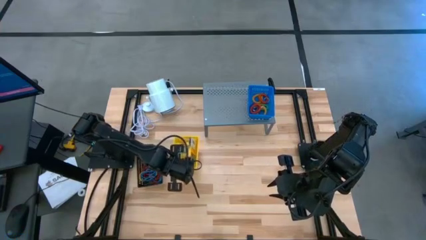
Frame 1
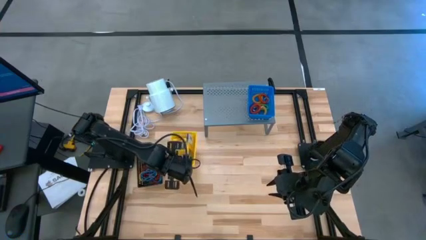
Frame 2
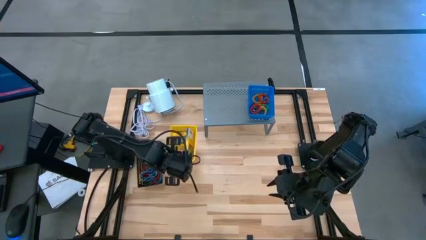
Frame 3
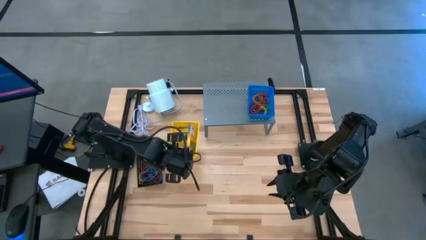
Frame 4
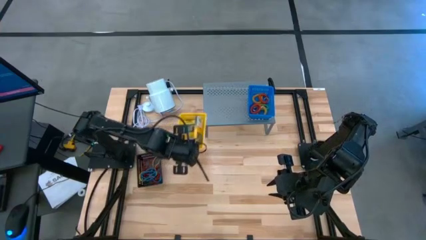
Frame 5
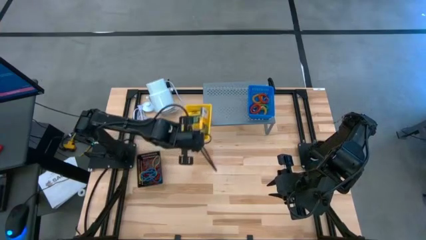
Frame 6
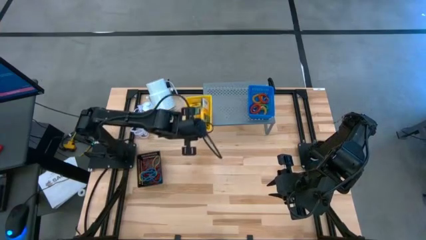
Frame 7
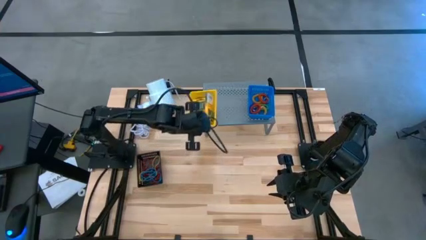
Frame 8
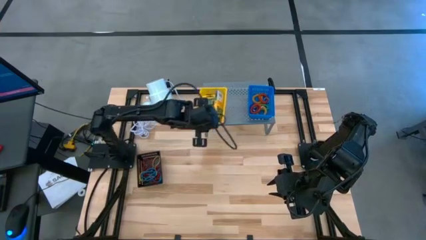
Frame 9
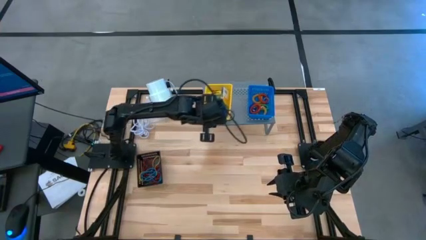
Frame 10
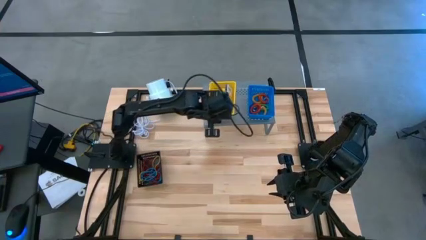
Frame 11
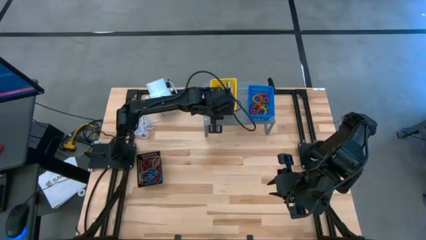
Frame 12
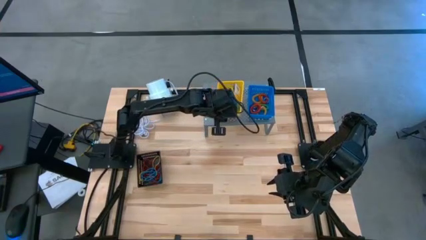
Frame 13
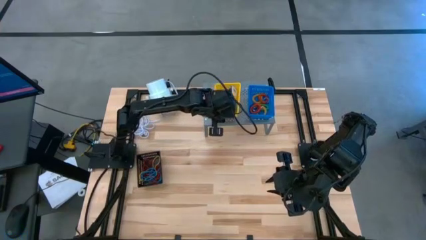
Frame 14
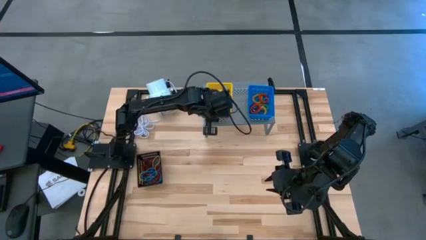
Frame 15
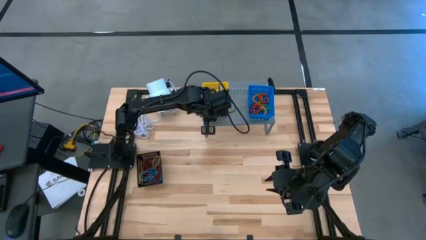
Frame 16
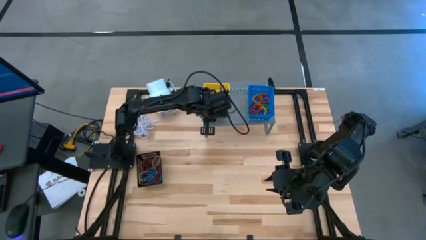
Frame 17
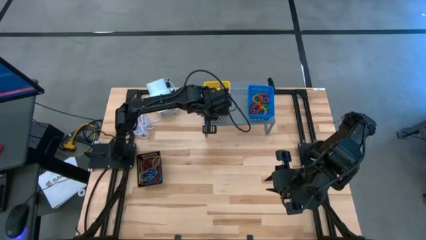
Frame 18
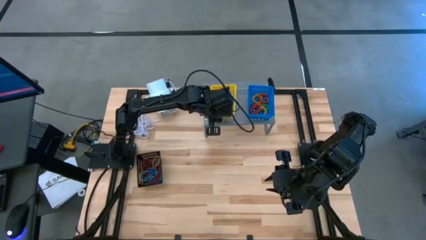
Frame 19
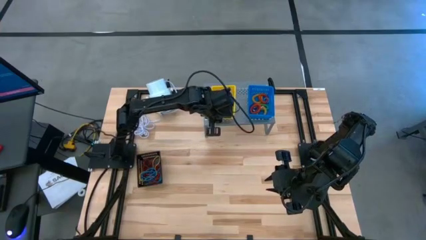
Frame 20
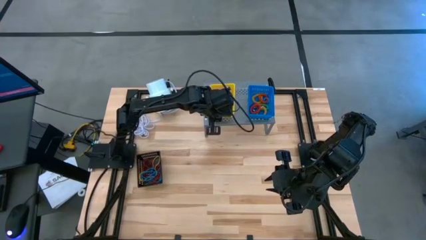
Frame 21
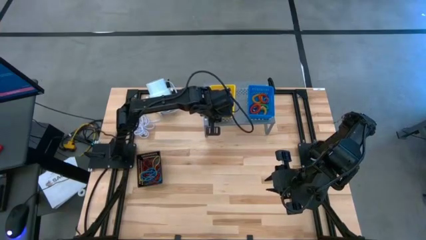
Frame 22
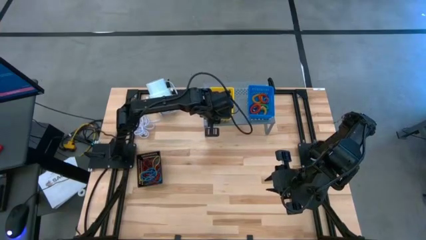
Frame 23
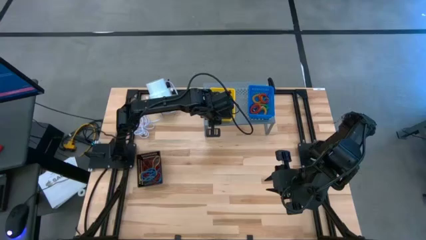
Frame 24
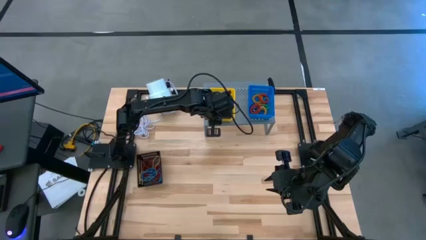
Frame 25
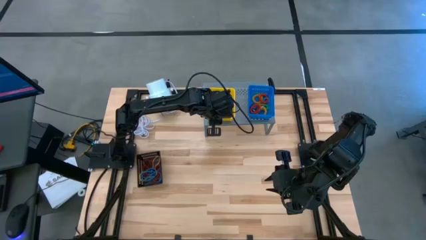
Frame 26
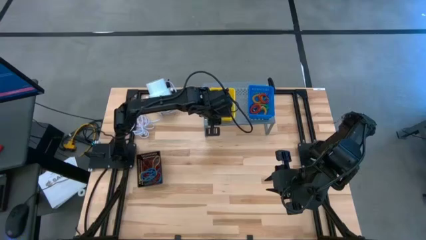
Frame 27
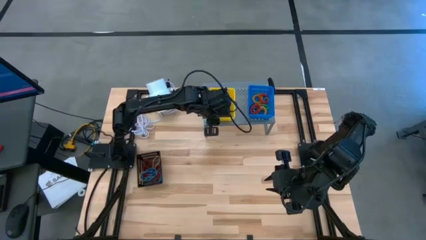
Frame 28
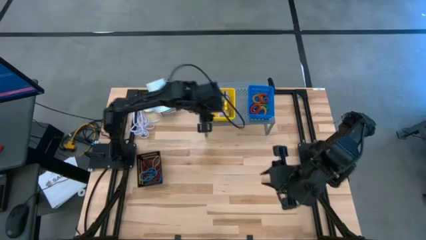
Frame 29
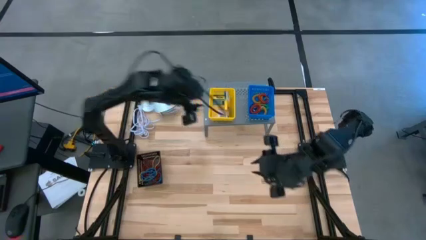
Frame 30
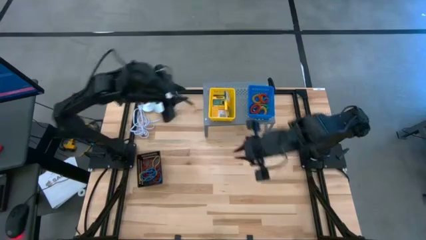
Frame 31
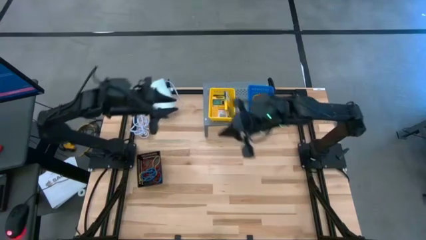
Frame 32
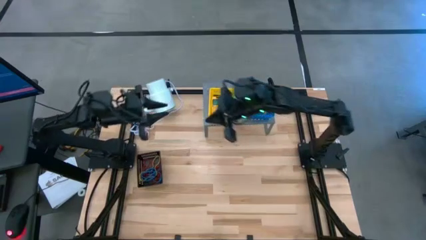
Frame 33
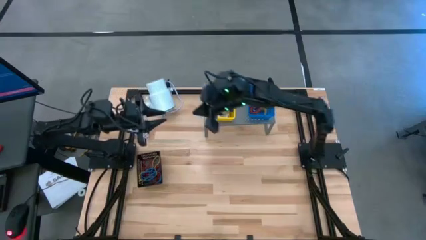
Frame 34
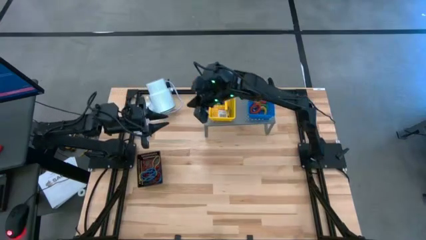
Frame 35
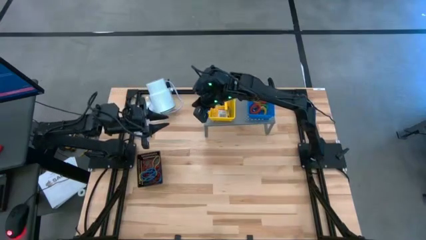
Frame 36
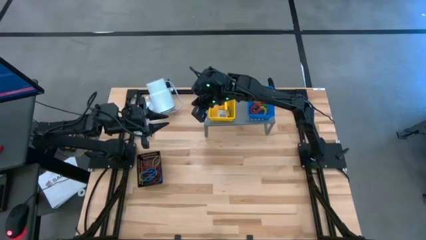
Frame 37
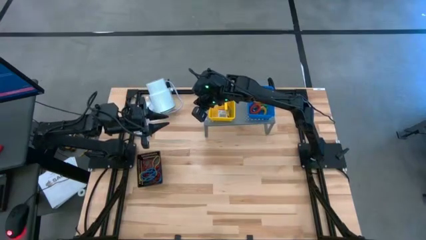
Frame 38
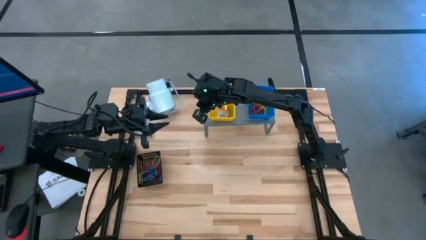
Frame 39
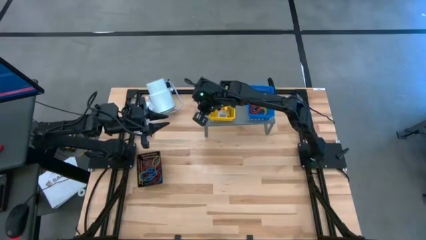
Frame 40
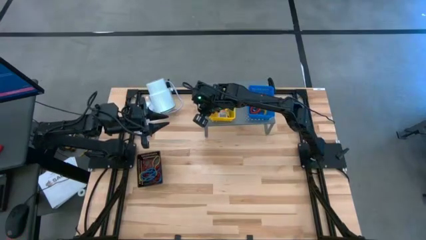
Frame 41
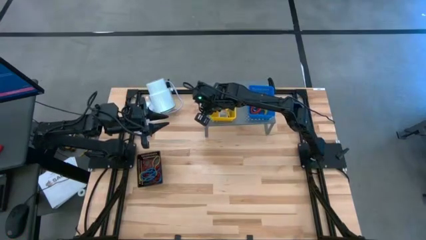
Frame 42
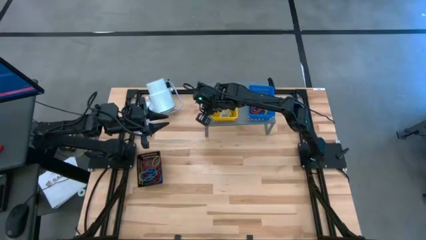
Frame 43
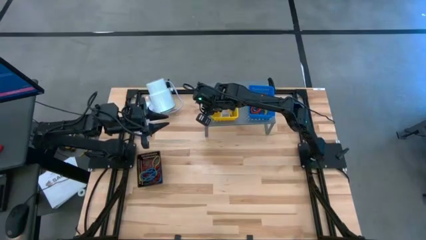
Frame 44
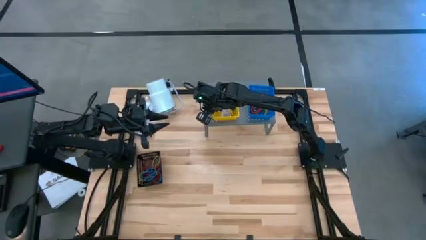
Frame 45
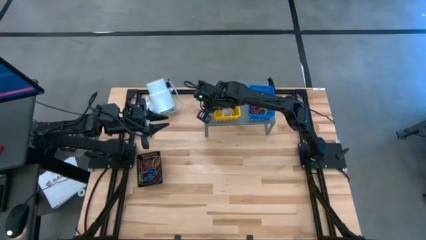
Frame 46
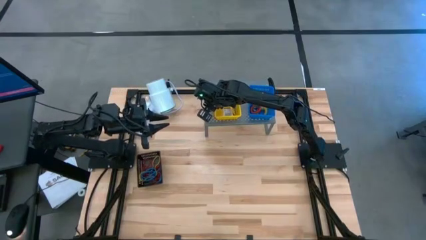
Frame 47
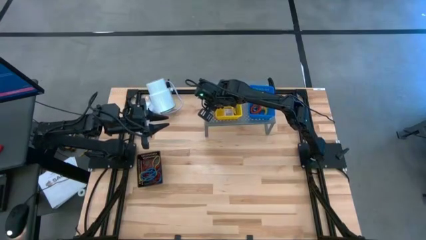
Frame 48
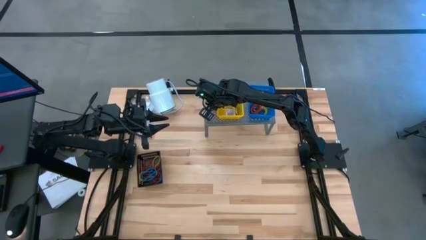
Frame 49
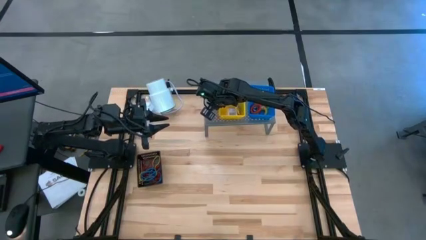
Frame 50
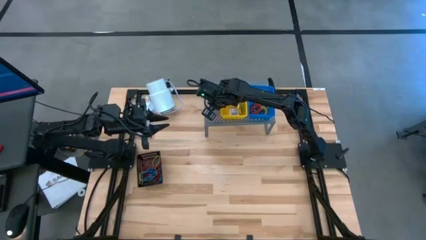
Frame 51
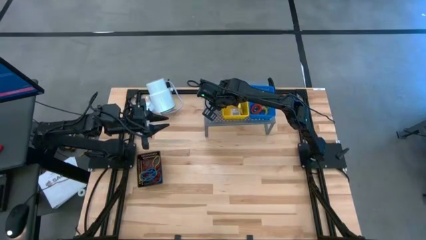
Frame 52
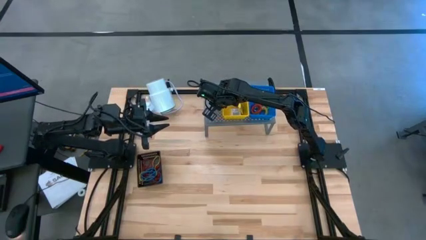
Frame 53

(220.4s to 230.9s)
Task: Pick & Place Office Desk Supplies
Put the yellow bin on the shelf
